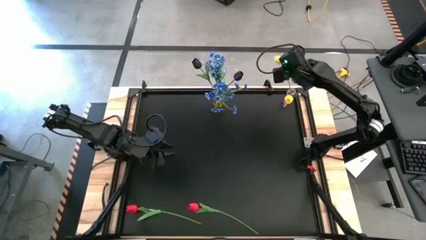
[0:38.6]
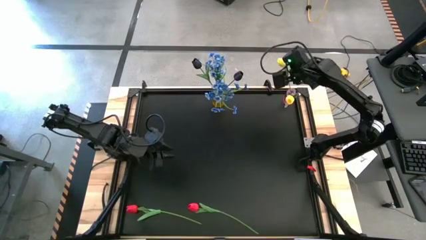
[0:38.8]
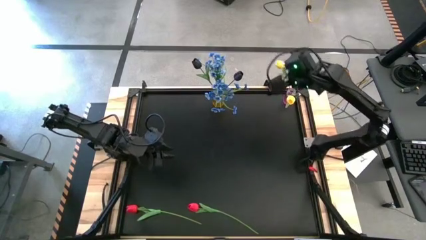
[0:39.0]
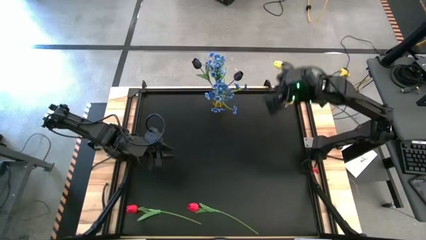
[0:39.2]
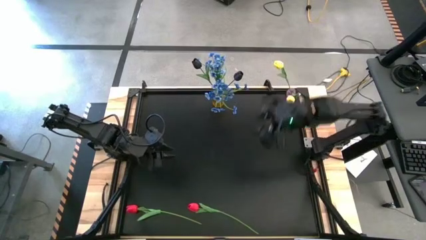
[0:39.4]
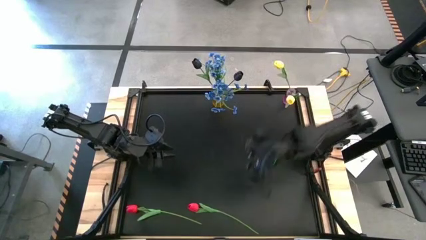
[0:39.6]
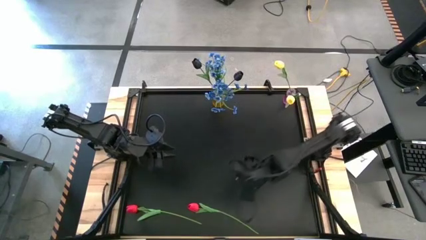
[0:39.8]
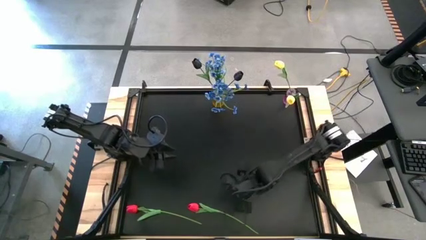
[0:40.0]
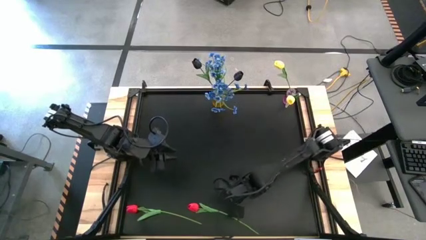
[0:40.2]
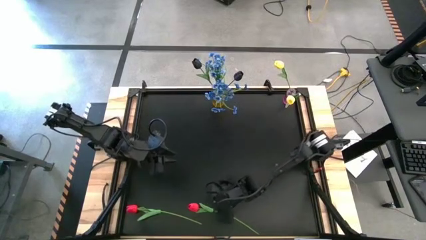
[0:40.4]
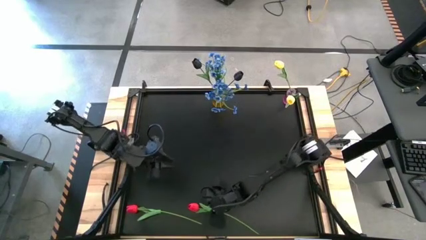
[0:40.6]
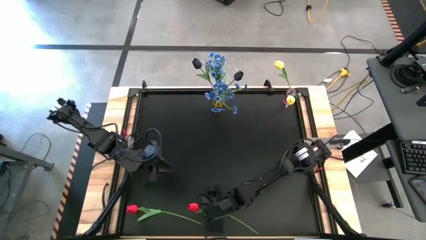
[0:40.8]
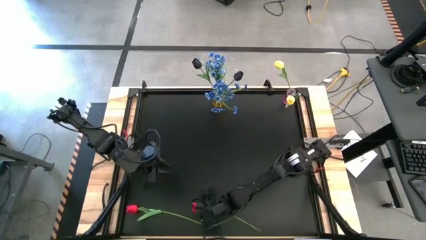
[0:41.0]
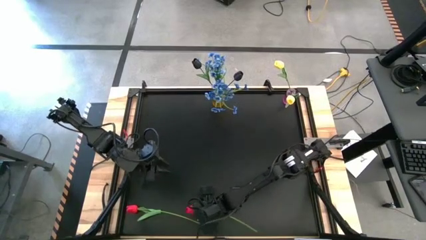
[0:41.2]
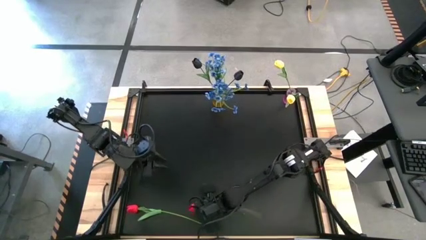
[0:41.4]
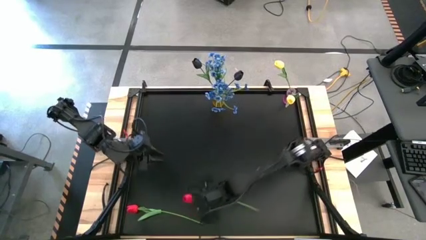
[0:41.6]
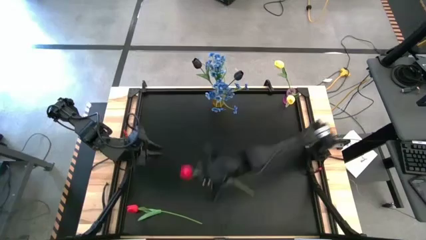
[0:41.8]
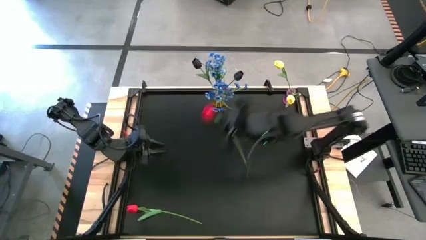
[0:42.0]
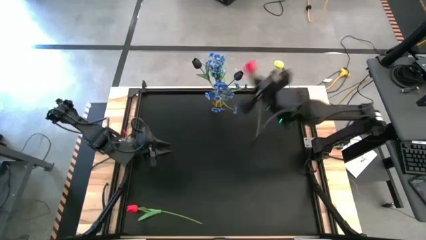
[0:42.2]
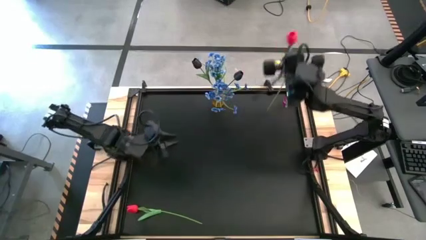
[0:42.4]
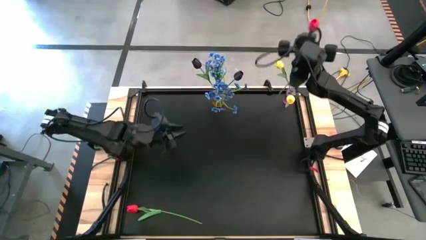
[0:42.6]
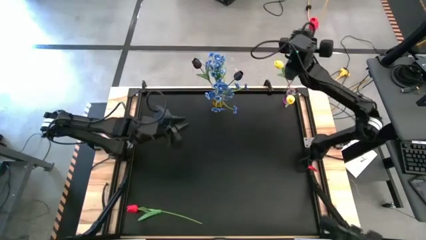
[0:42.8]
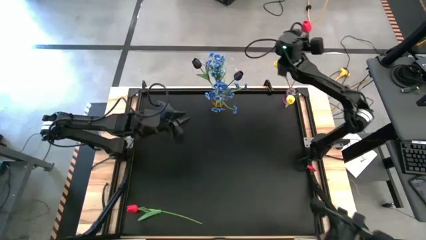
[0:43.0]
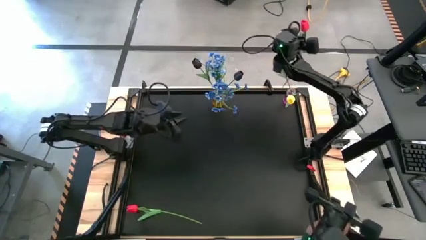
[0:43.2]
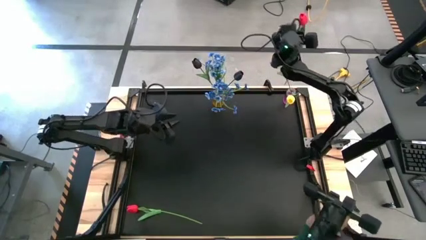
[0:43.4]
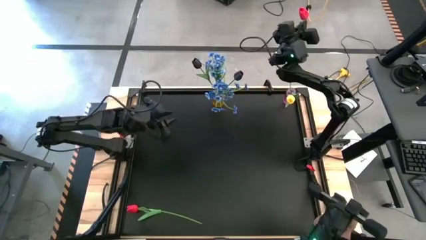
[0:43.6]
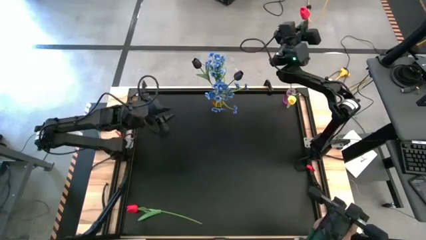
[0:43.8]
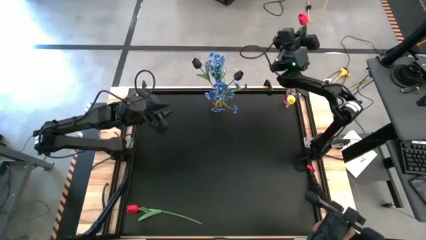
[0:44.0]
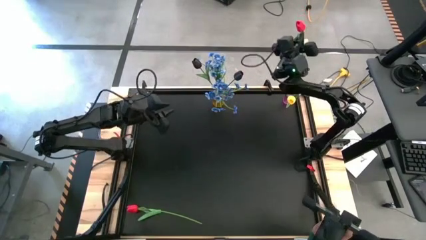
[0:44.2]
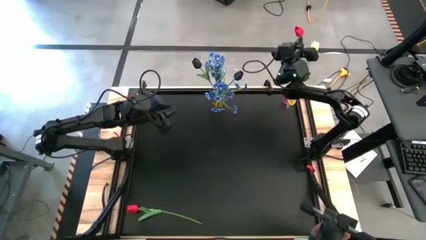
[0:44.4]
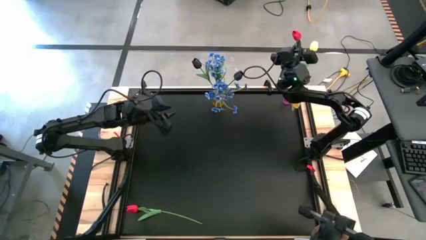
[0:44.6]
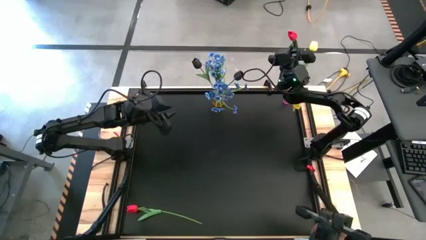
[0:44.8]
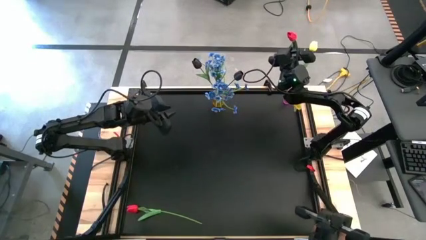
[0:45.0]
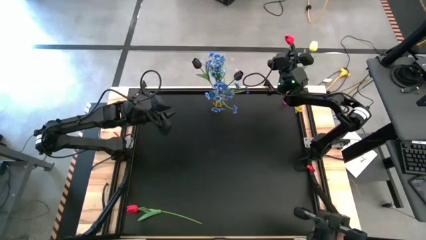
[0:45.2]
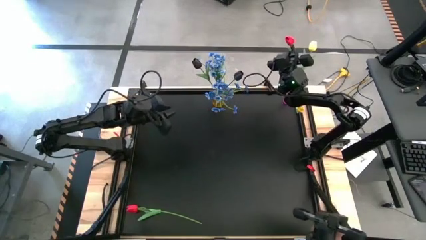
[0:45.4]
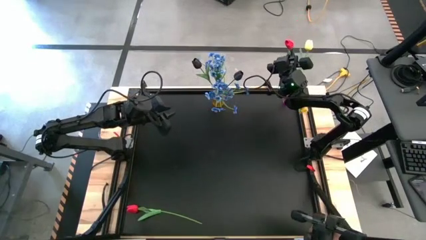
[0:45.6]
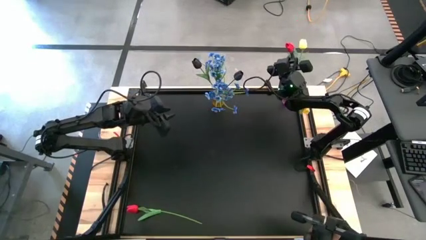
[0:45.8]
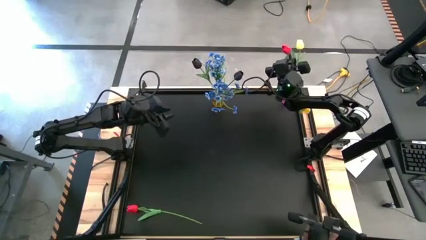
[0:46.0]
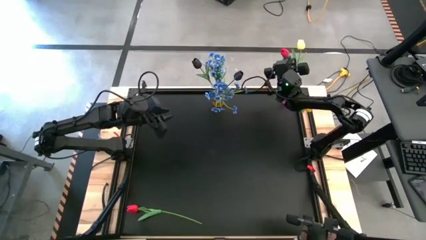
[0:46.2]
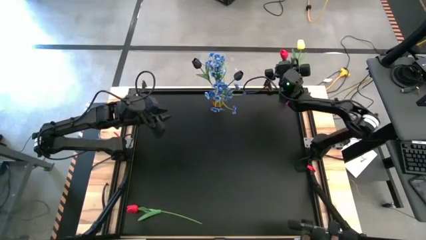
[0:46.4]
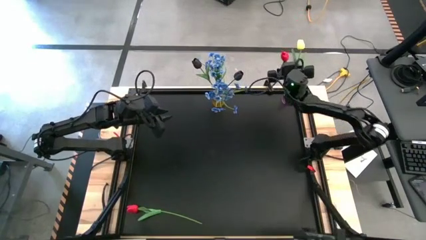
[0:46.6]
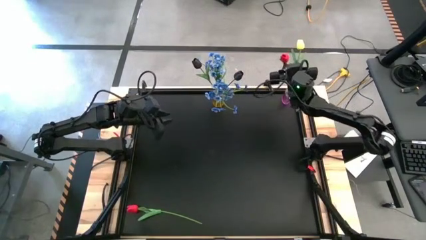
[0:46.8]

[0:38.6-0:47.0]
Task: Sort flowers into vase by color
Put the right red flower into the pink vase

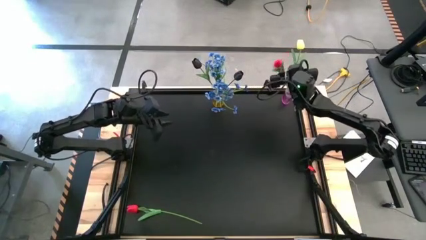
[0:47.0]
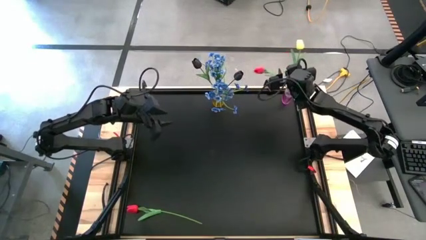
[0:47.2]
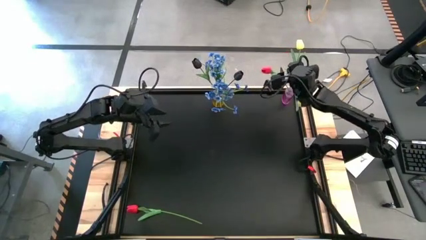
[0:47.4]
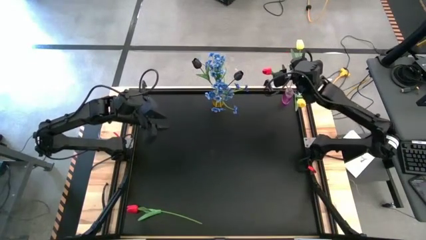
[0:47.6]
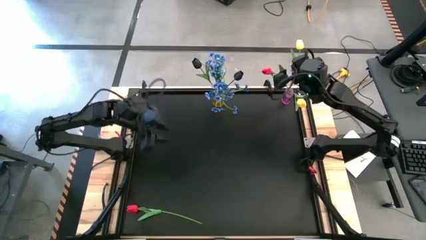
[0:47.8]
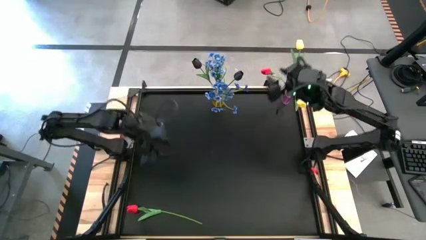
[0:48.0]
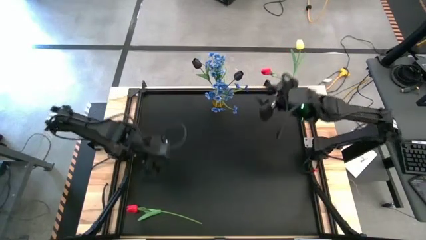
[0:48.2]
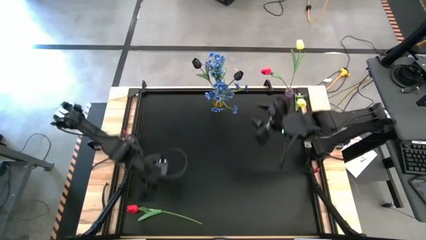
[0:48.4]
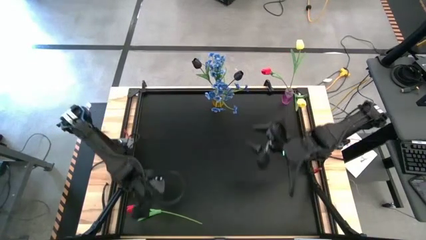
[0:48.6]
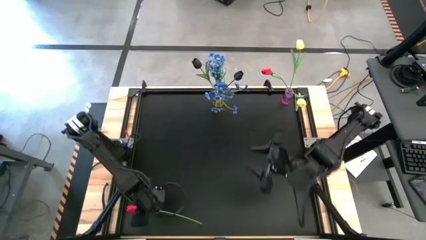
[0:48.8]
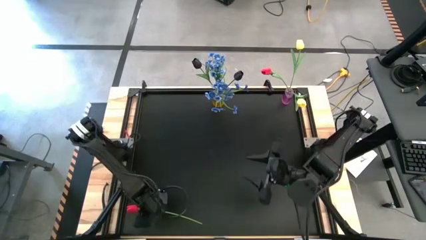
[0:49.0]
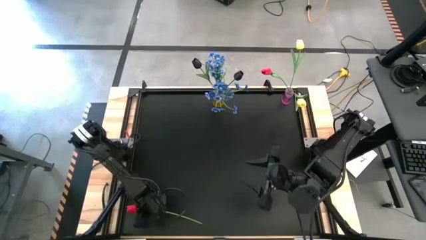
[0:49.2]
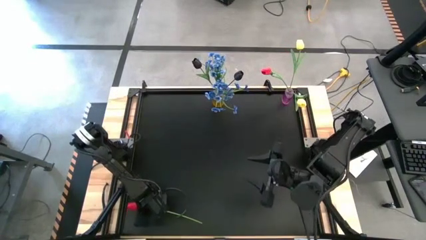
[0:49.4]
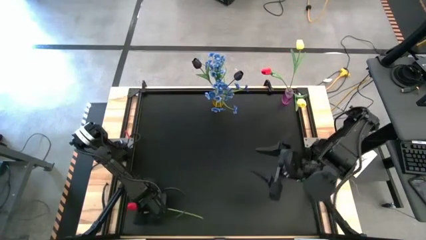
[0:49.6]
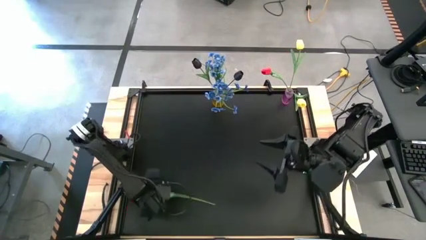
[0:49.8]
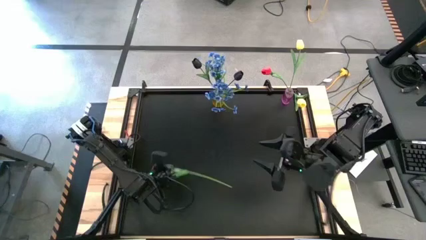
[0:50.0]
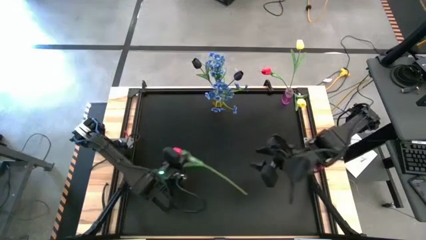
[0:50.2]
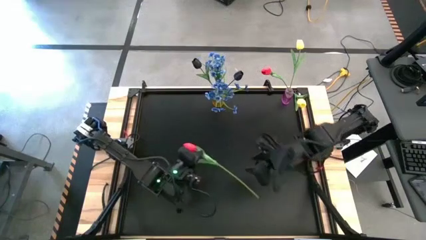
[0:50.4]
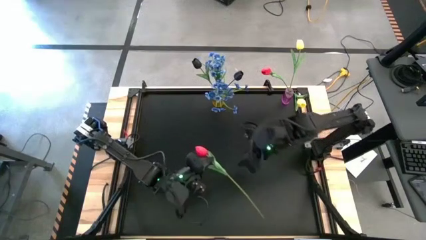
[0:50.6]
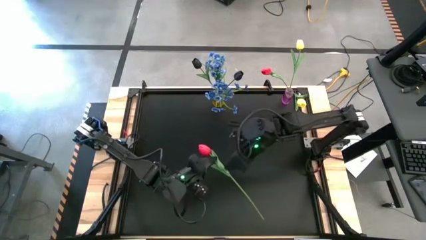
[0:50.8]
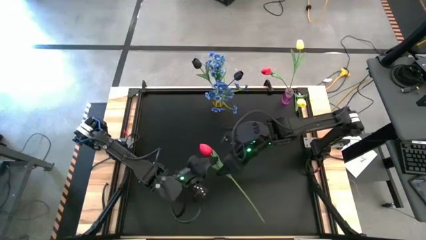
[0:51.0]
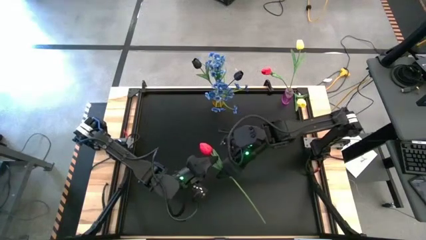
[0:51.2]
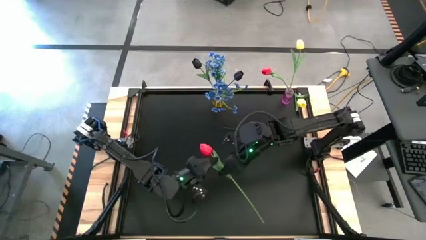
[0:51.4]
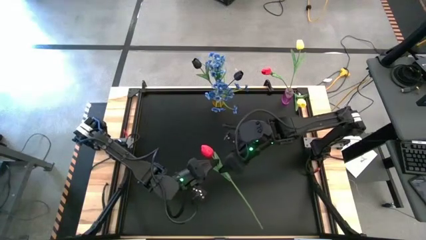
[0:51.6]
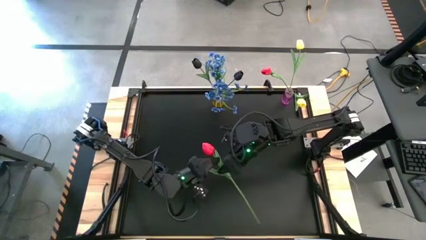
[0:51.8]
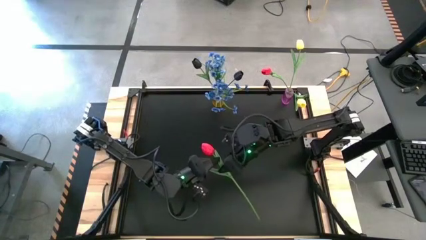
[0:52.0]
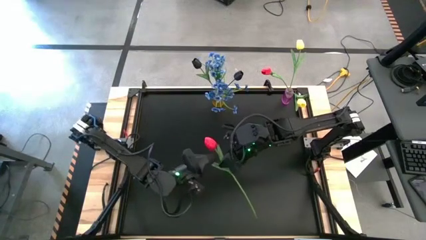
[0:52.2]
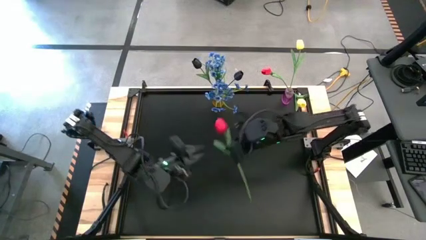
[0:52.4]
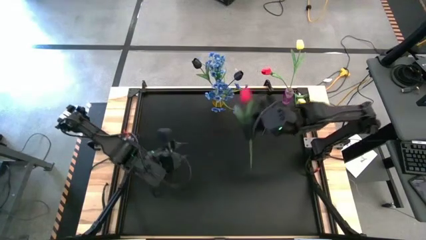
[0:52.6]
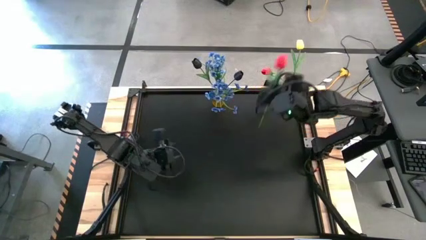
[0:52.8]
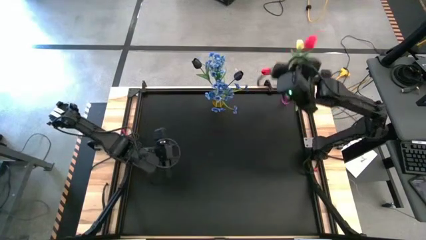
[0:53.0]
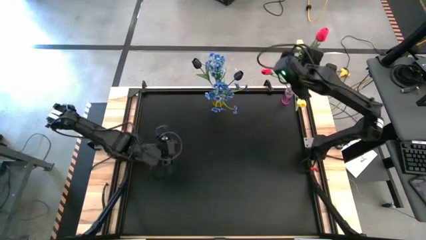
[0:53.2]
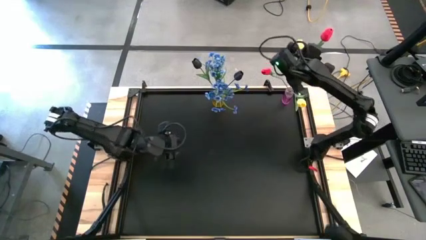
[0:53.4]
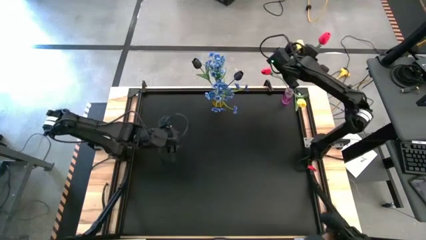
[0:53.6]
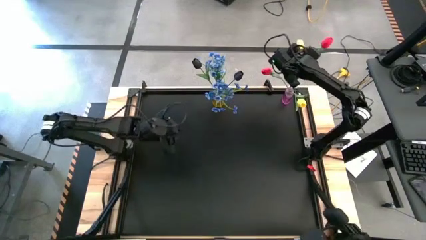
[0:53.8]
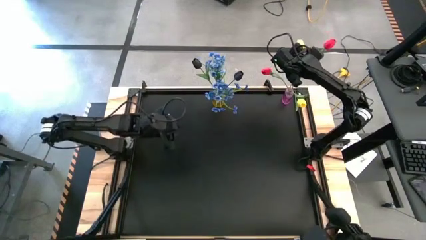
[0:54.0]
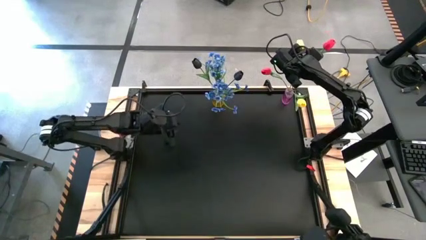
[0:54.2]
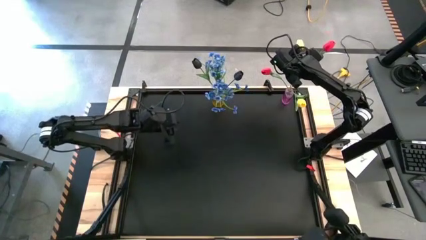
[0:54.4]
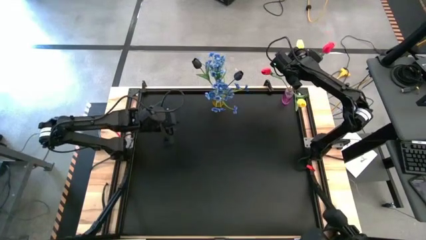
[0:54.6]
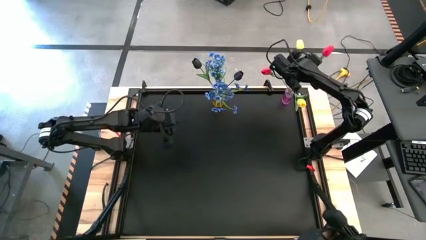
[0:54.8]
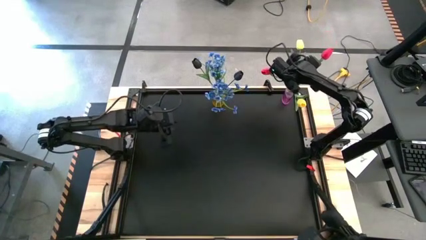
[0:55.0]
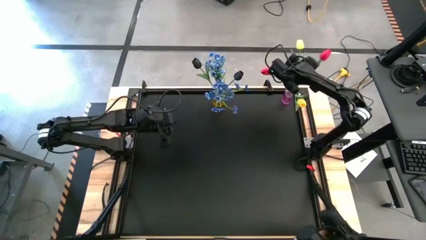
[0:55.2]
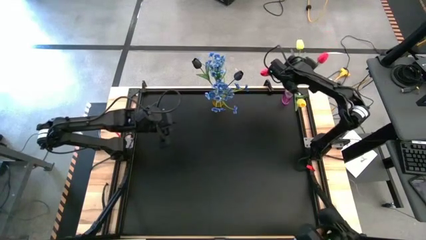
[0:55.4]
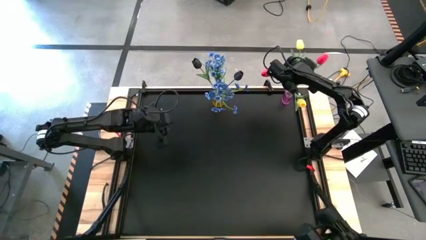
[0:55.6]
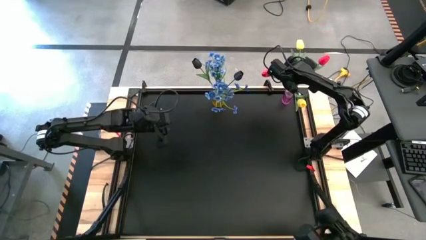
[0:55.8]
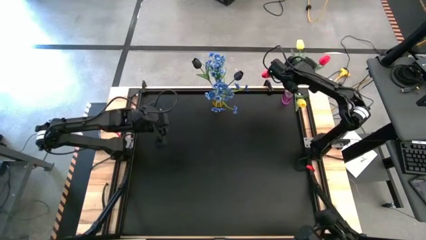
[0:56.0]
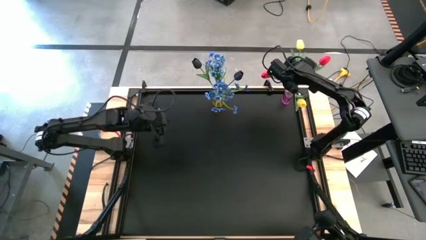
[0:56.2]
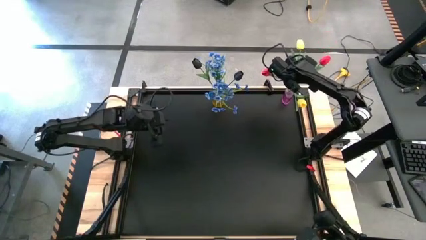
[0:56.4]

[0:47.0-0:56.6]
Put the red flower into the pink vase
